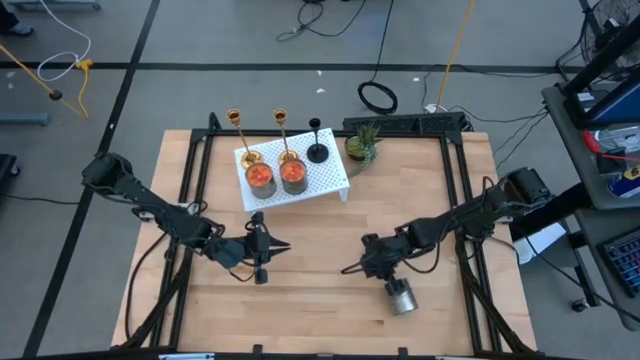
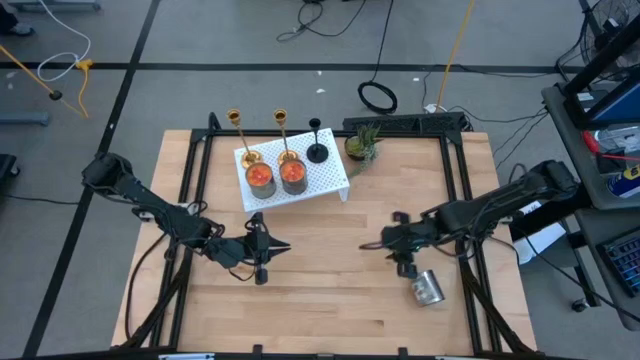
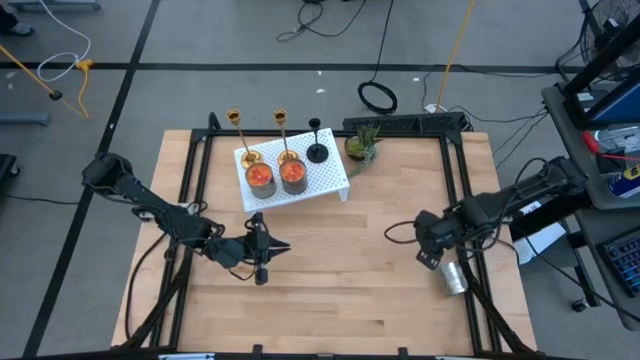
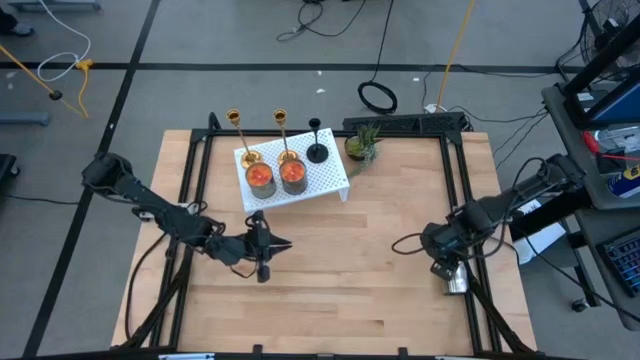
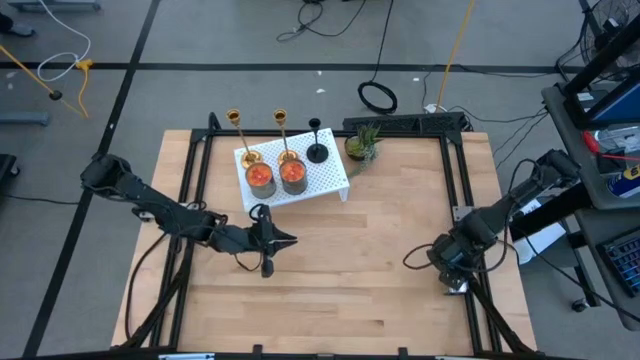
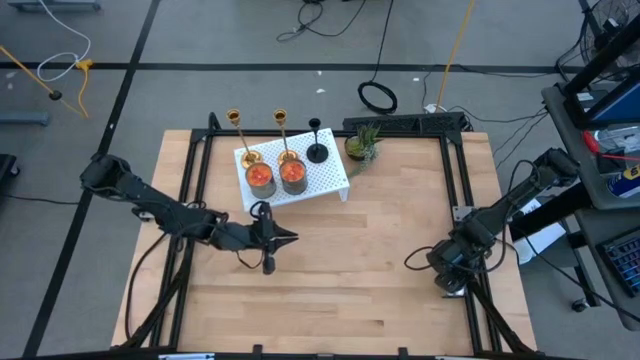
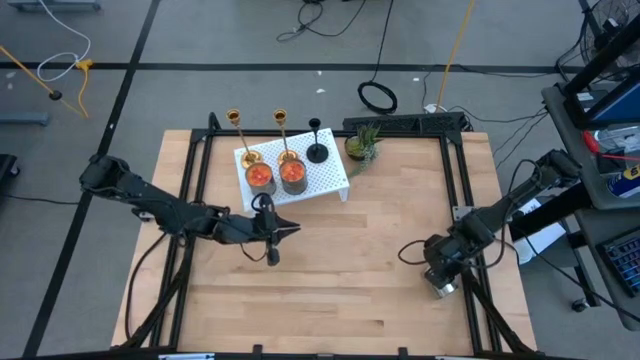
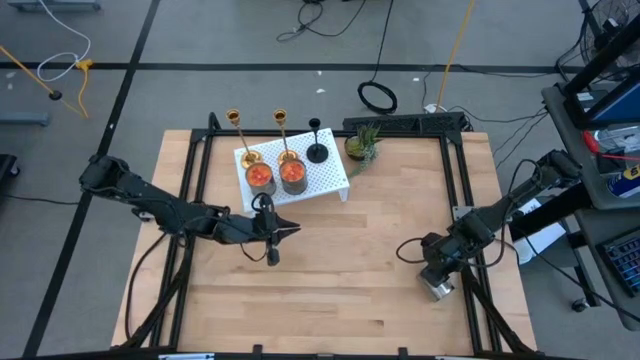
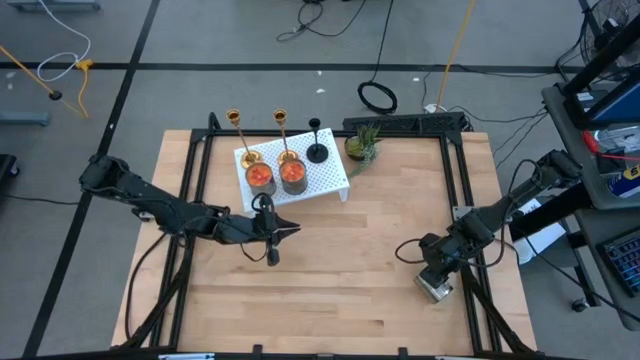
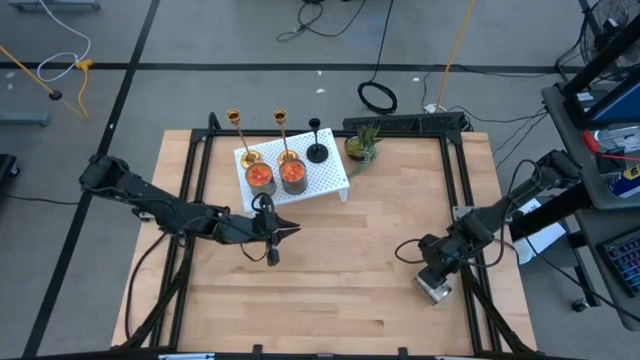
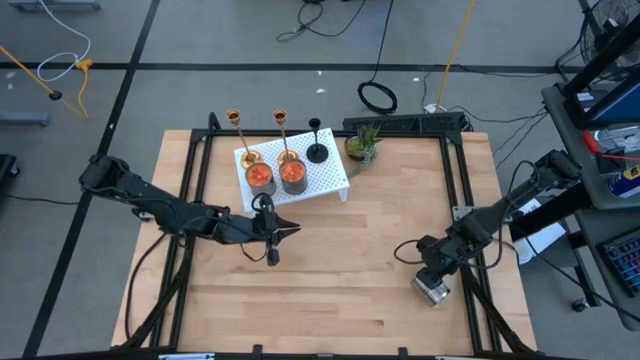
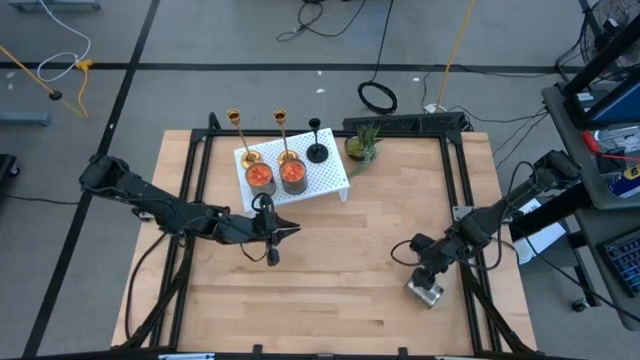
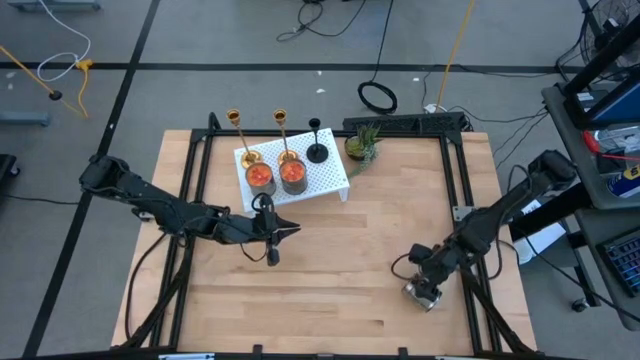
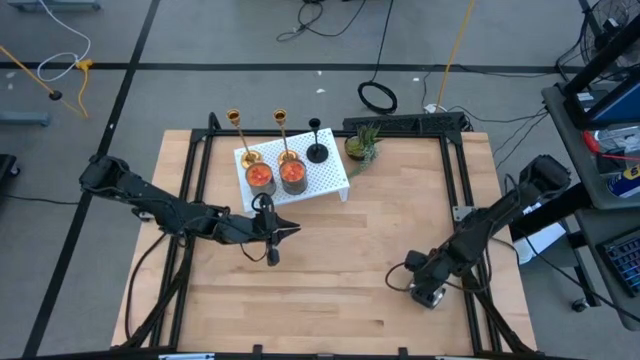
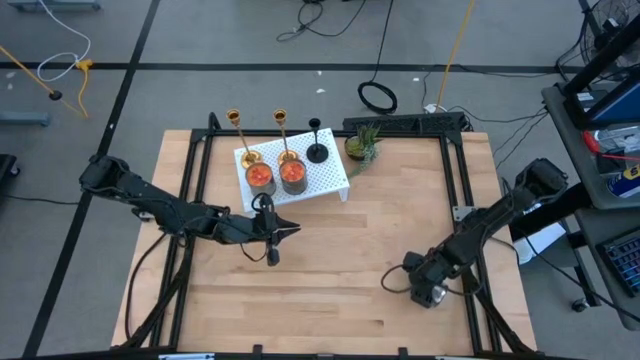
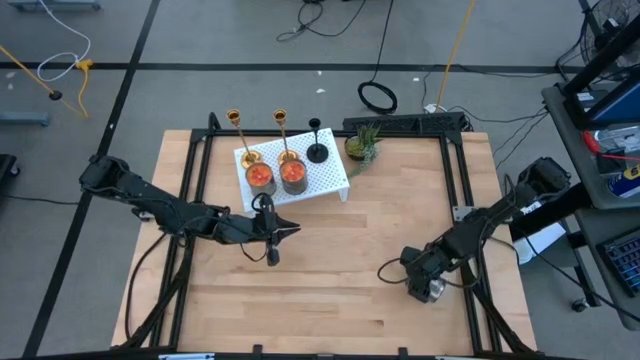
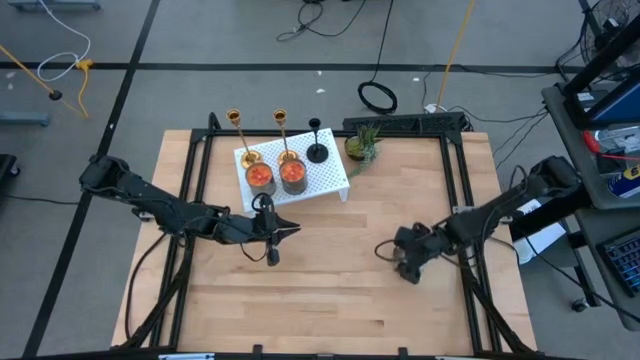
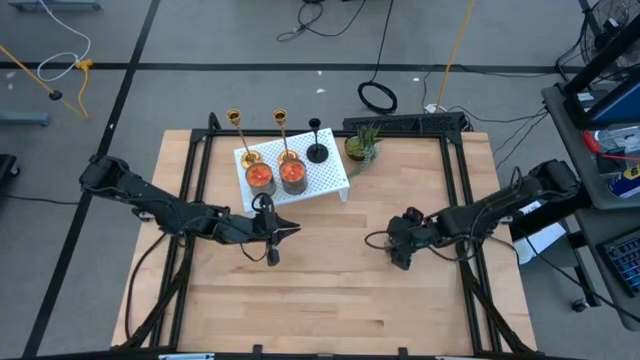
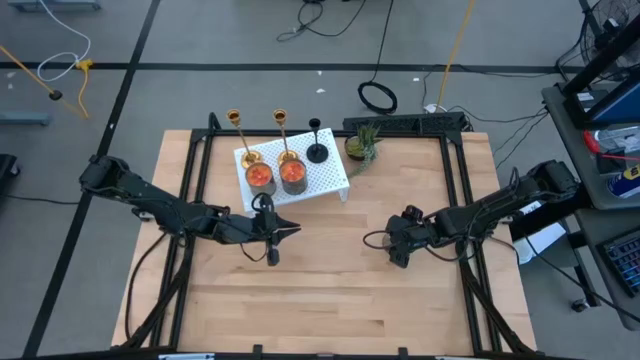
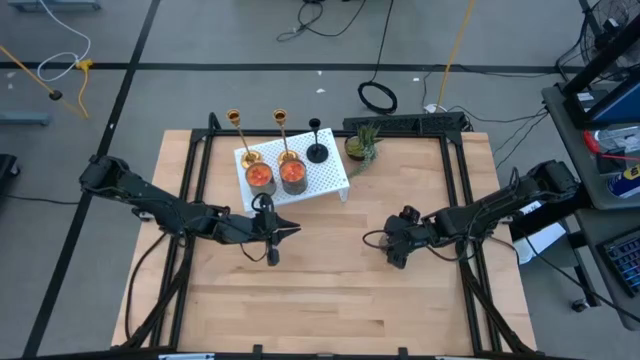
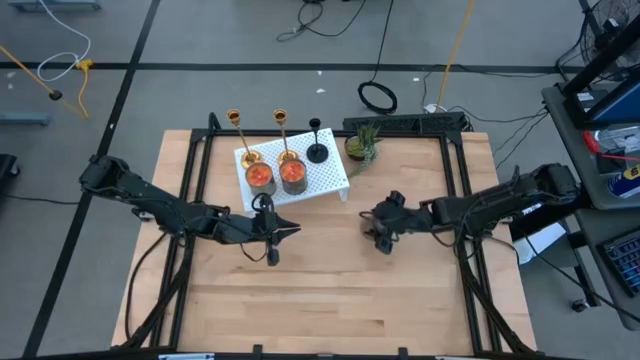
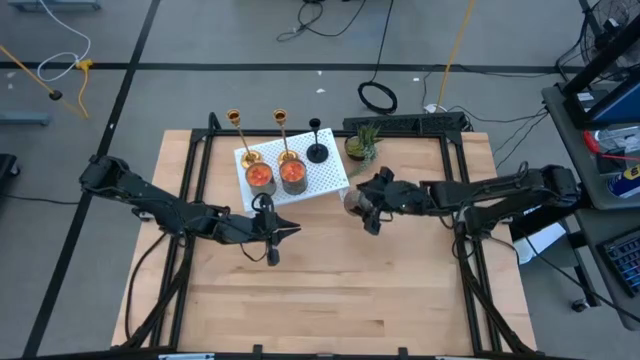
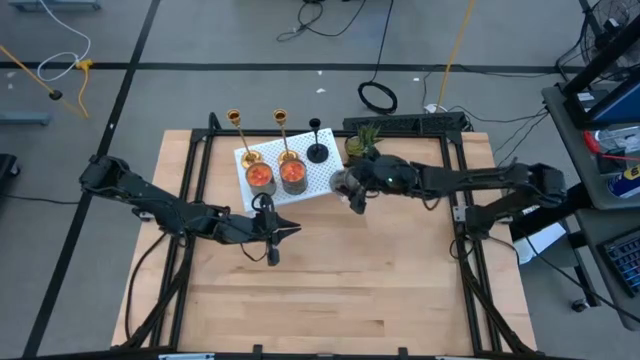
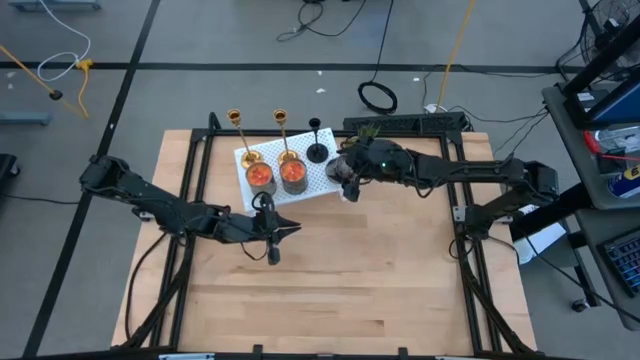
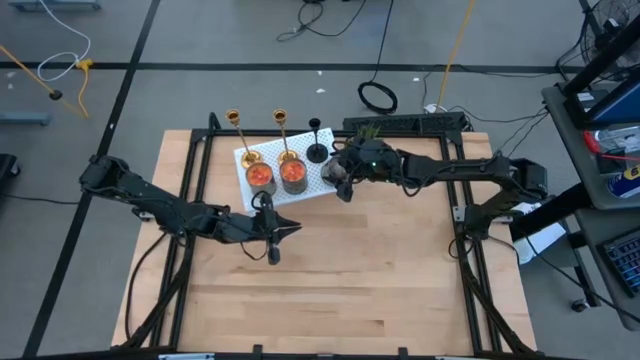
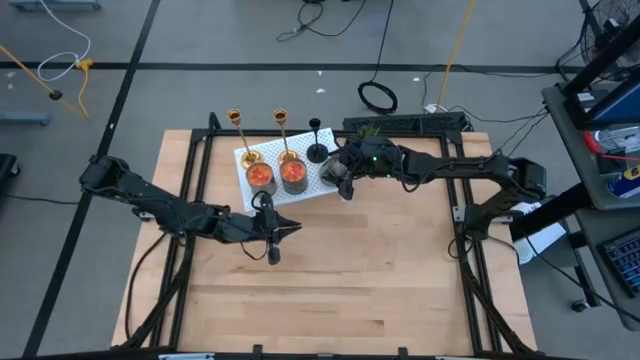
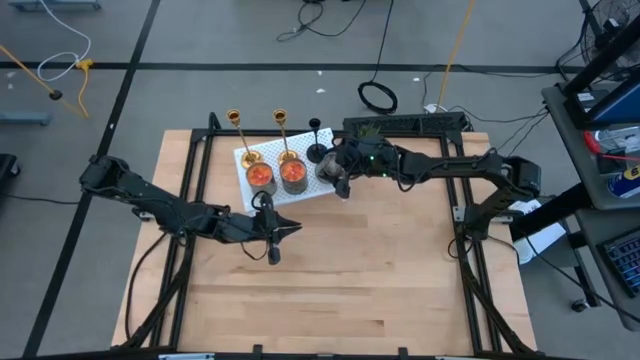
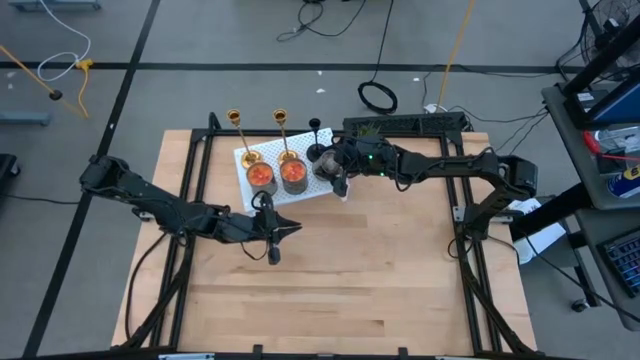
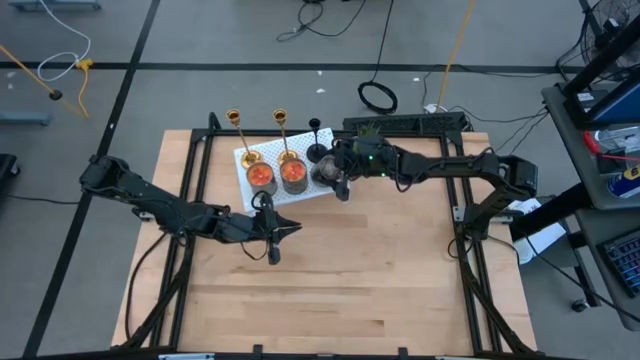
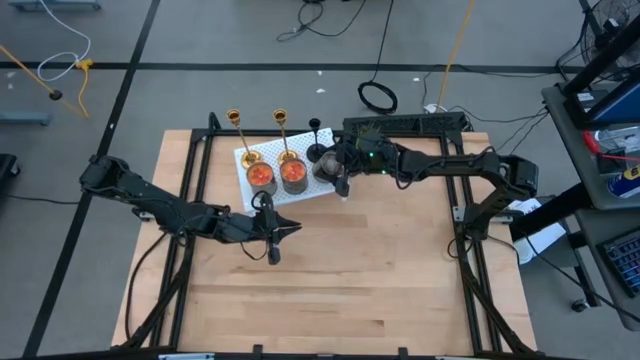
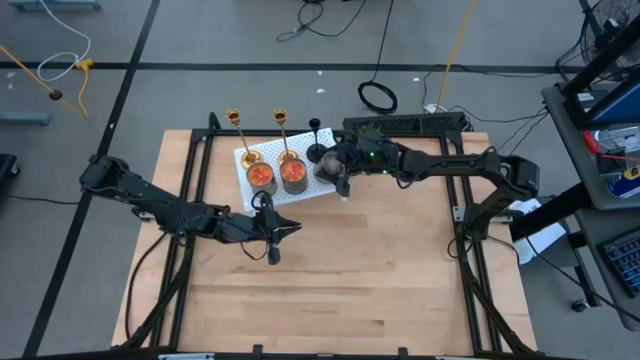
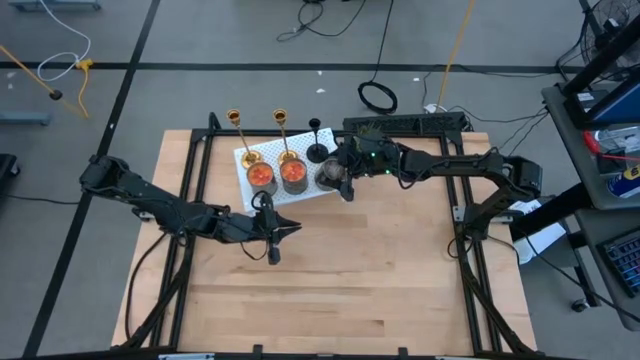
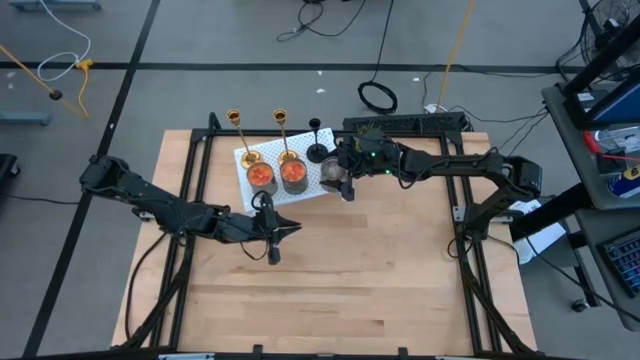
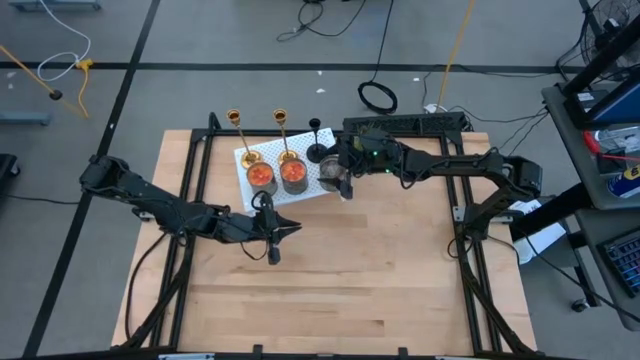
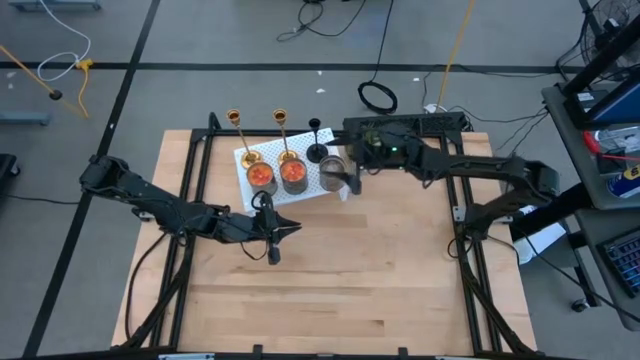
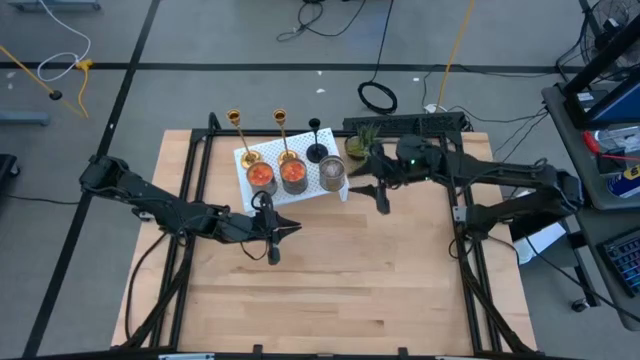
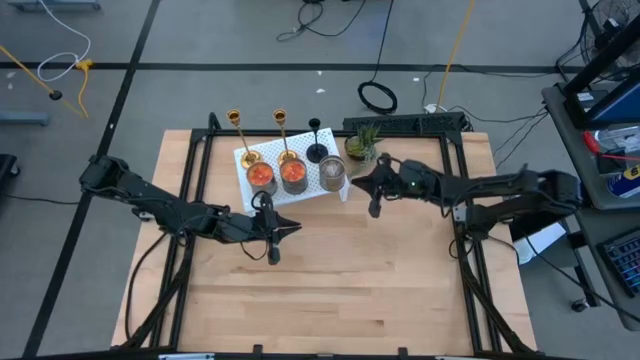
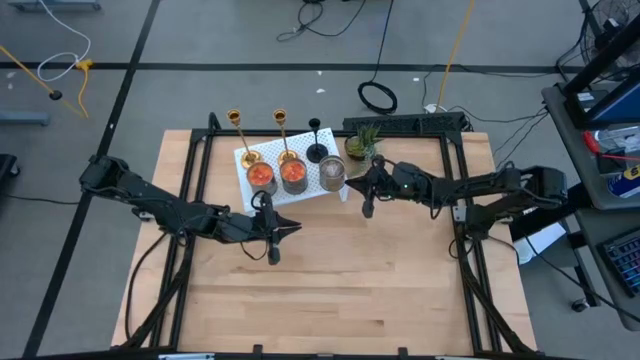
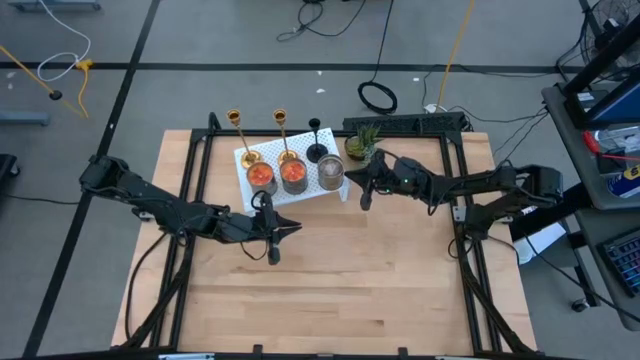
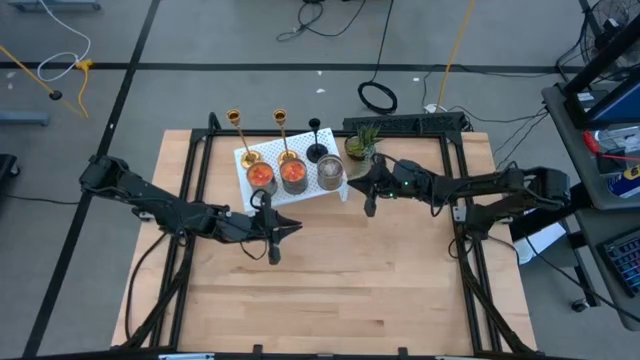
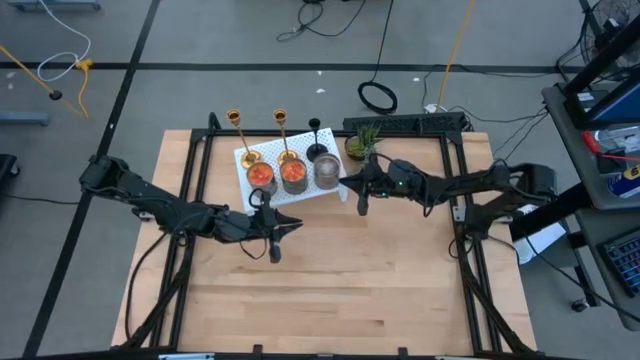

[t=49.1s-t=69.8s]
Task: Pick & Place candle stick holders
Put the brown scented candle on the shelf
